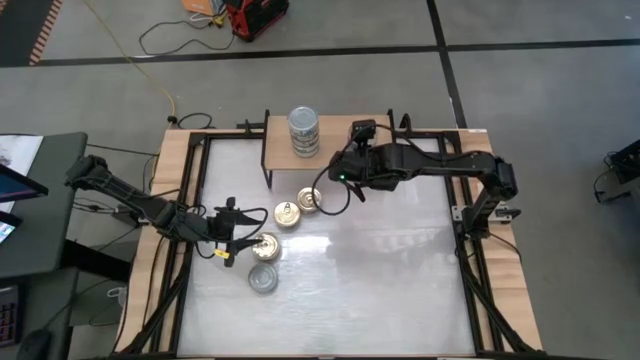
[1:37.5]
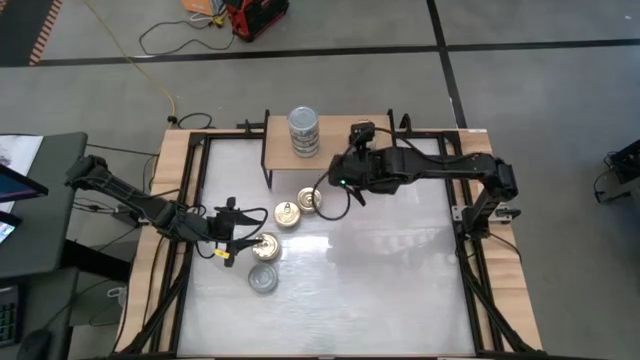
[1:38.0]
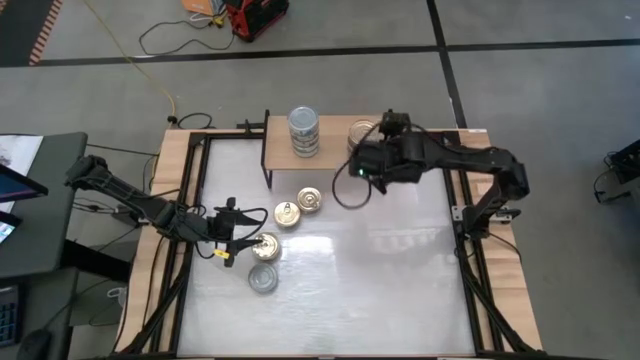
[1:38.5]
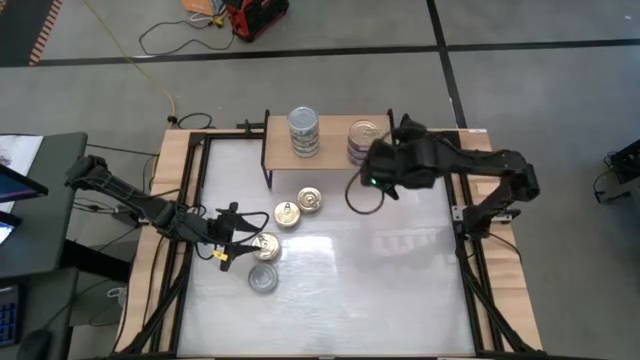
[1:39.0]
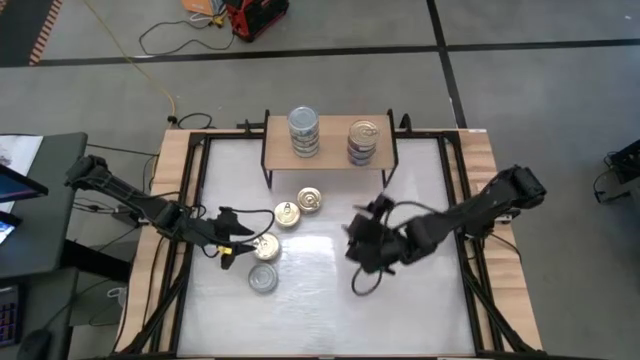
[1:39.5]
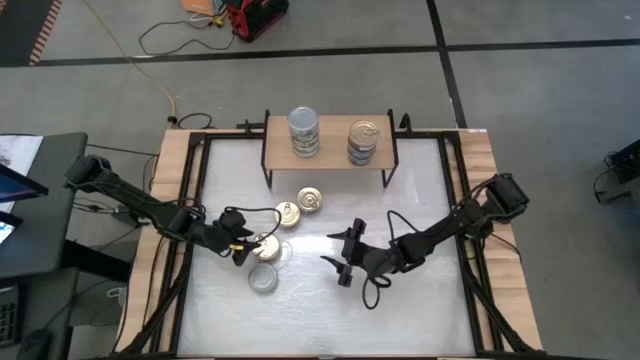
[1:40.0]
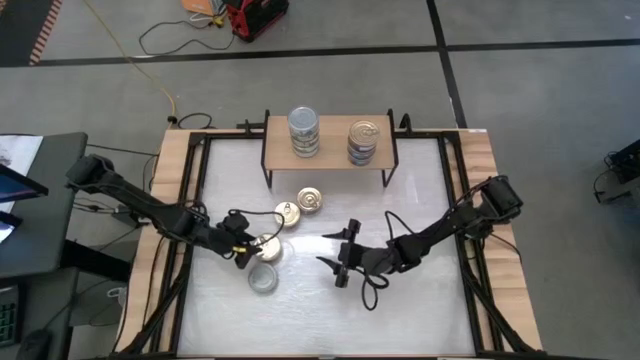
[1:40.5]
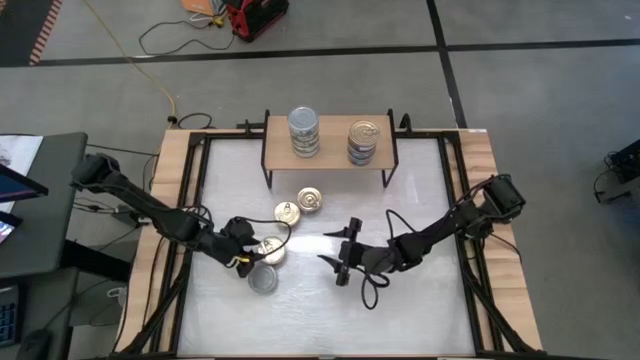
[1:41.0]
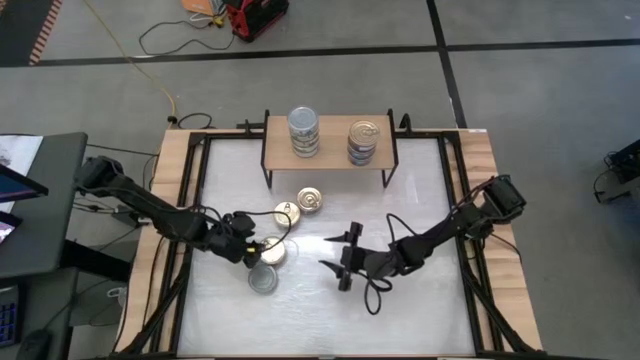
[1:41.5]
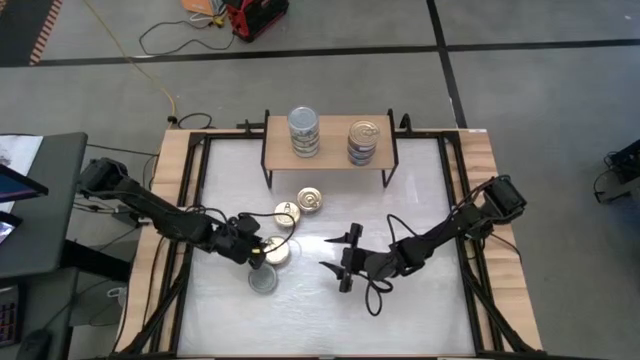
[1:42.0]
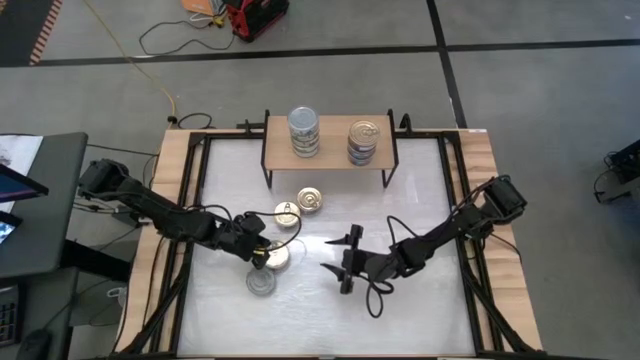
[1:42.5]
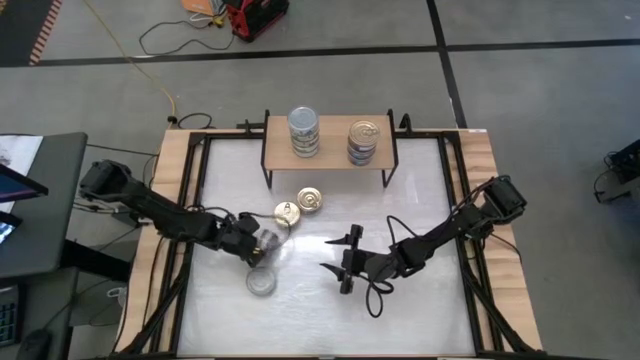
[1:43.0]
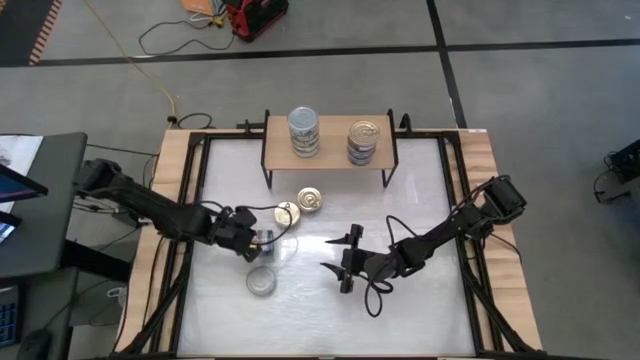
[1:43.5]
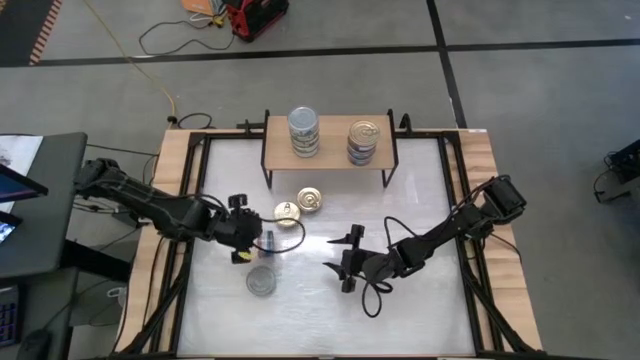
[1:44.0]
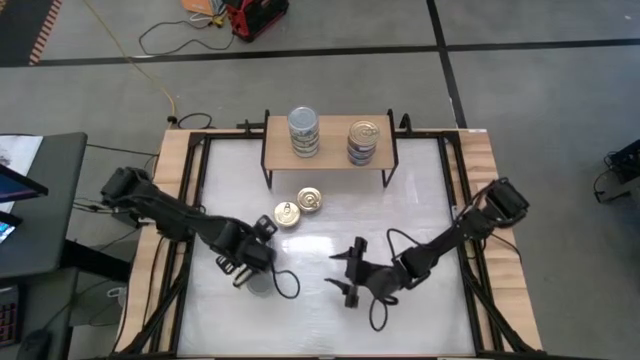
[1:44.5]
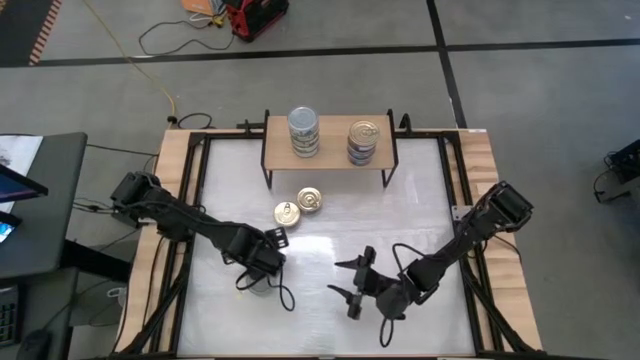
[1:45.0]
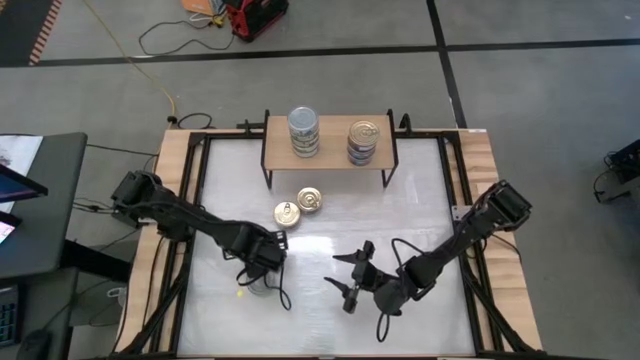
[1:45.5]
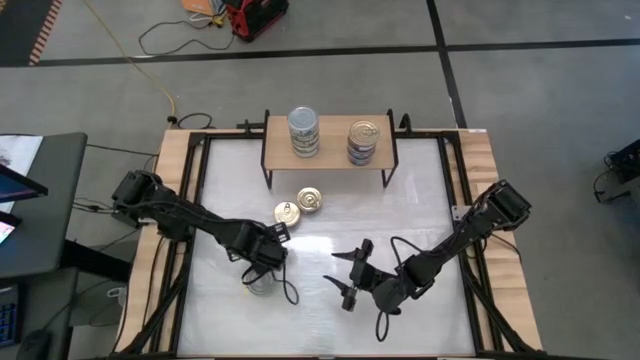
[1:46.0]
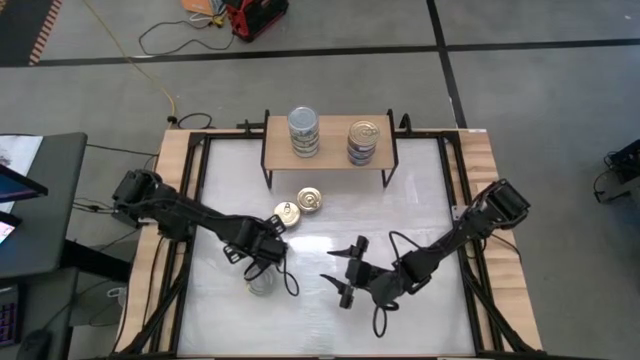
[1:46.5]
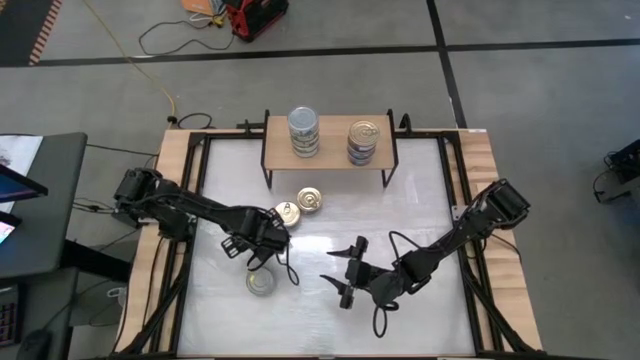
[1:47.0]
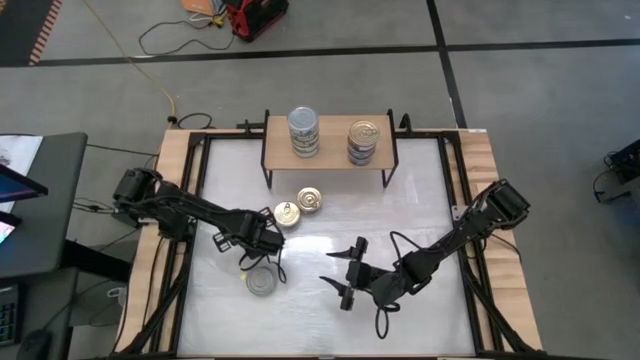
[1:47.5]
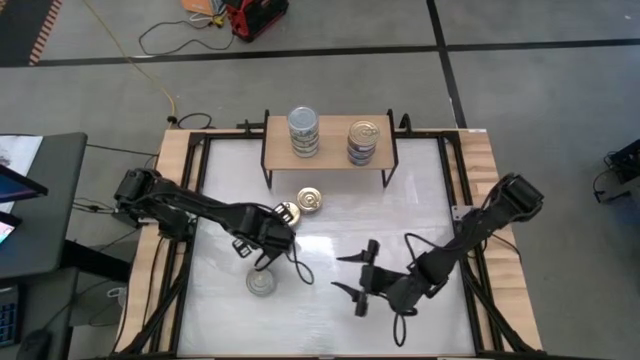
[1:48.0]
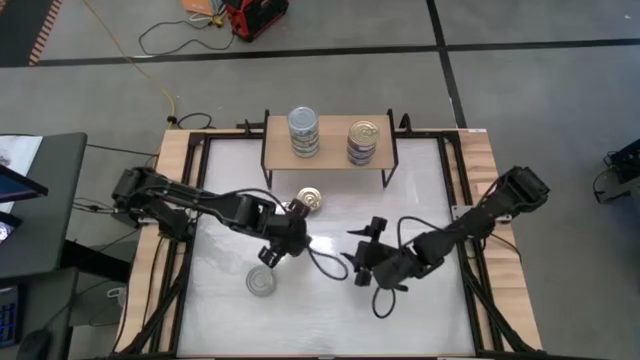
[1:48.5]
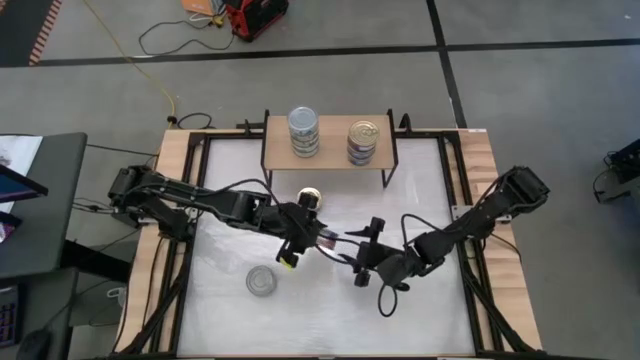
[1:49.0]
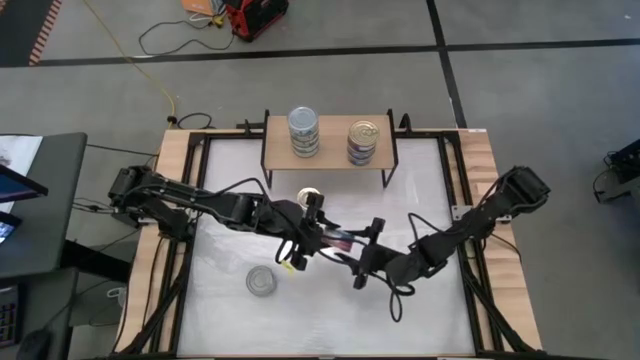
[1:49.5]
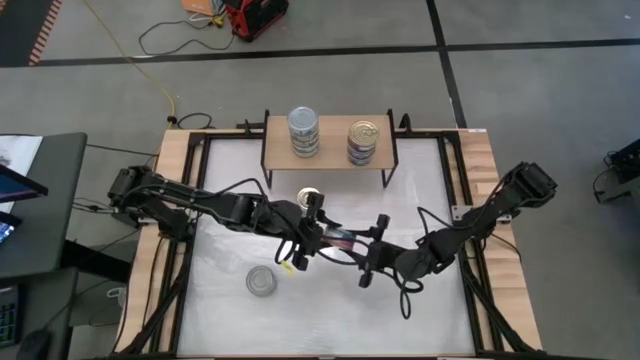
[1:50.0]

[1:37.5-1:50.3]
Task: Stack canned seafood by type on shelf
Stack the blue pink tuna can on top of the other blue and pink tuna cans on the shelf

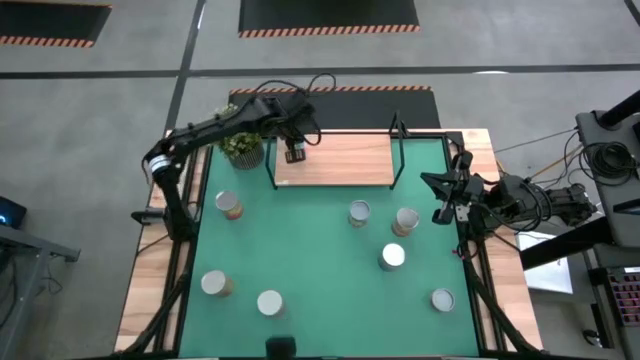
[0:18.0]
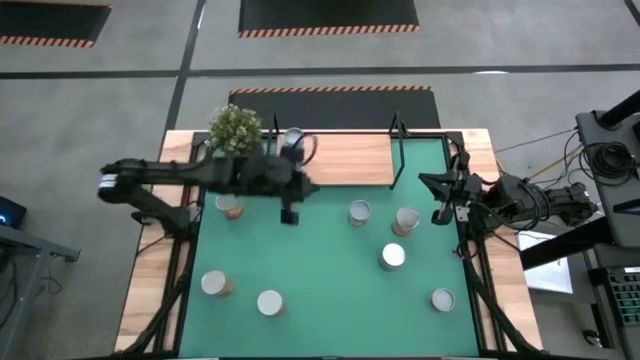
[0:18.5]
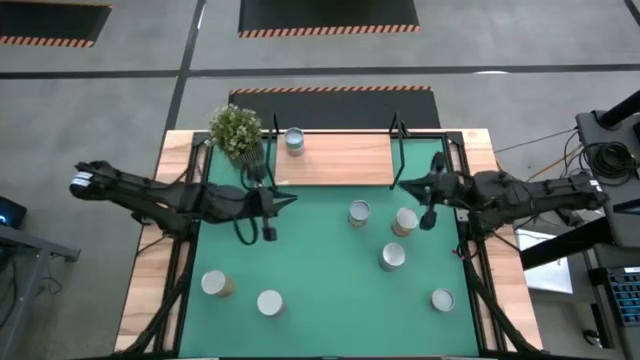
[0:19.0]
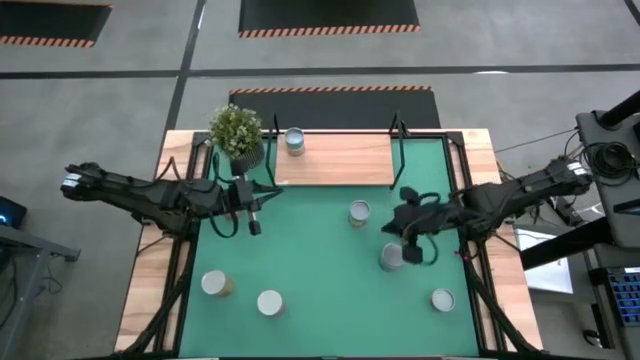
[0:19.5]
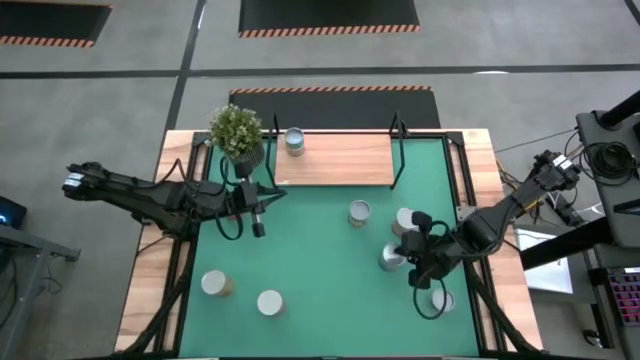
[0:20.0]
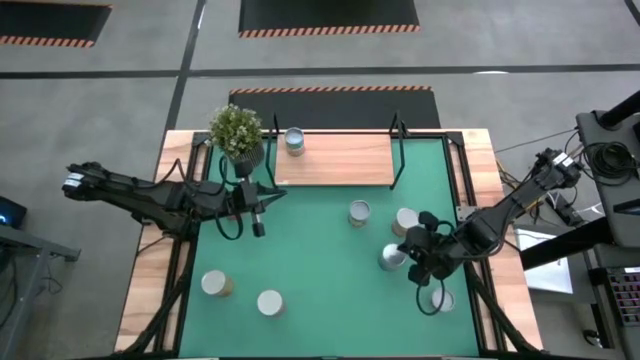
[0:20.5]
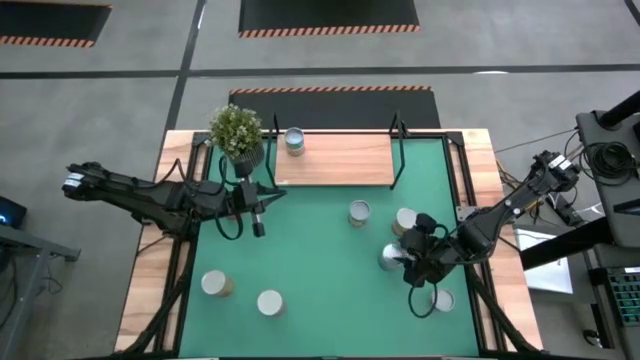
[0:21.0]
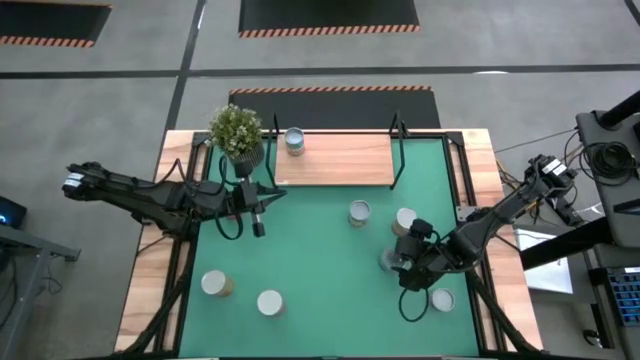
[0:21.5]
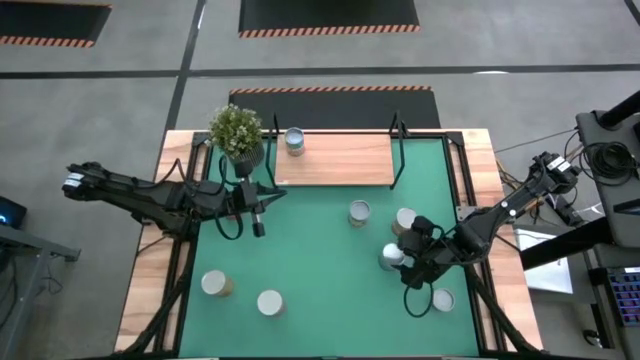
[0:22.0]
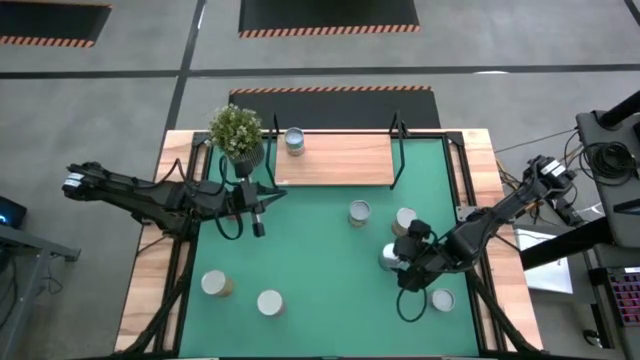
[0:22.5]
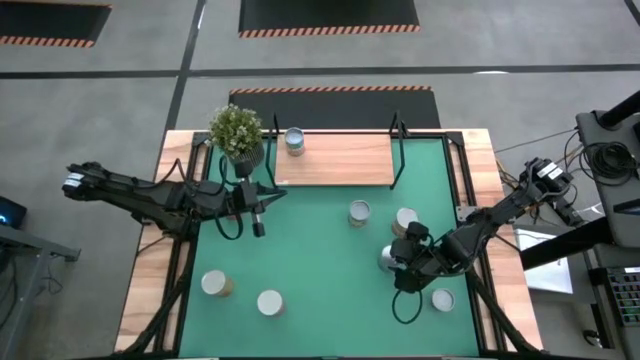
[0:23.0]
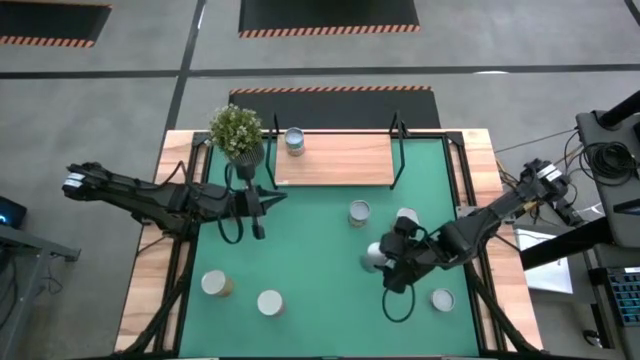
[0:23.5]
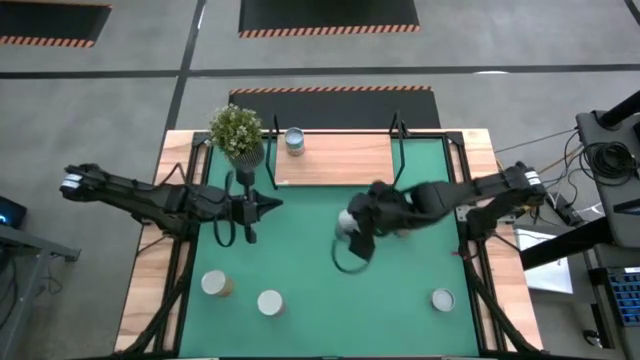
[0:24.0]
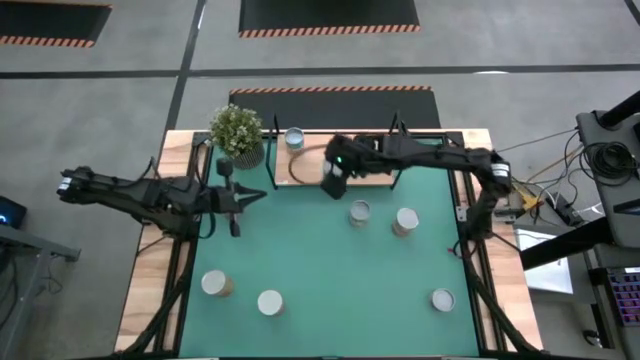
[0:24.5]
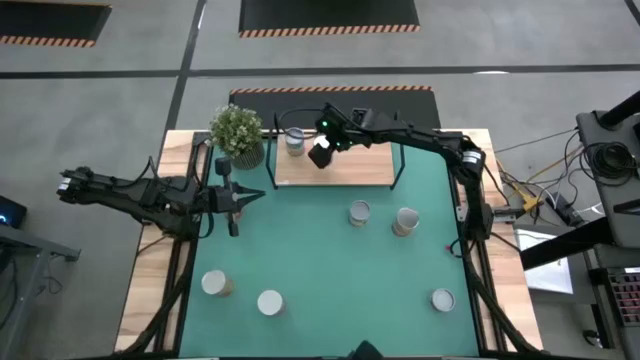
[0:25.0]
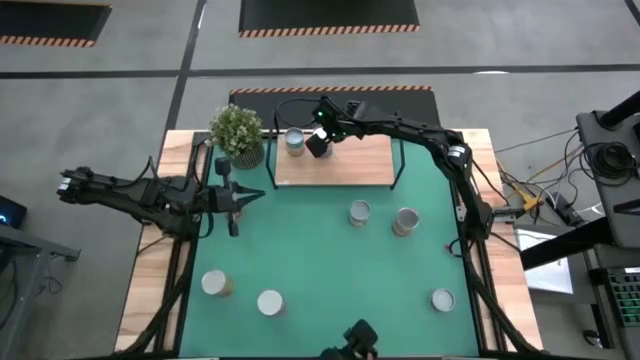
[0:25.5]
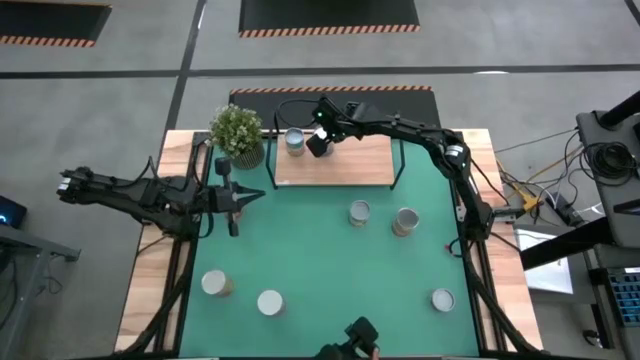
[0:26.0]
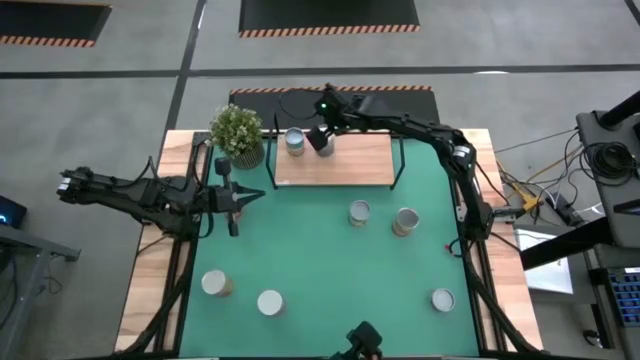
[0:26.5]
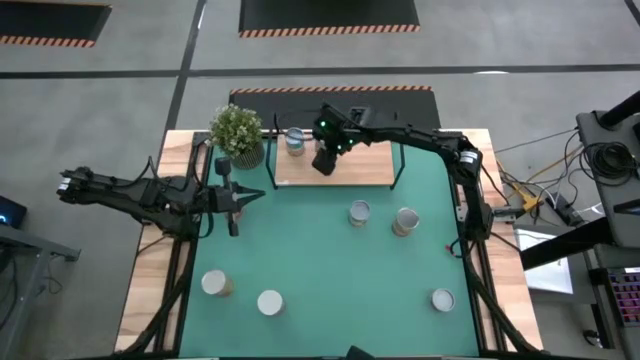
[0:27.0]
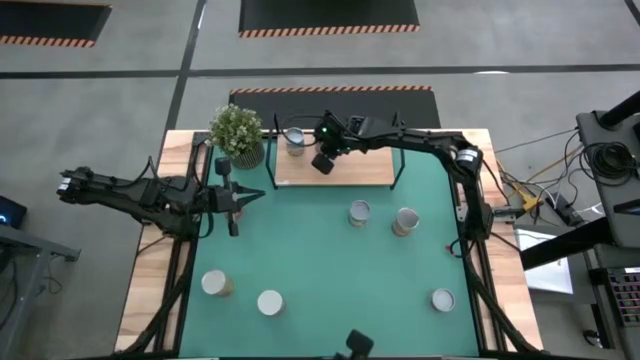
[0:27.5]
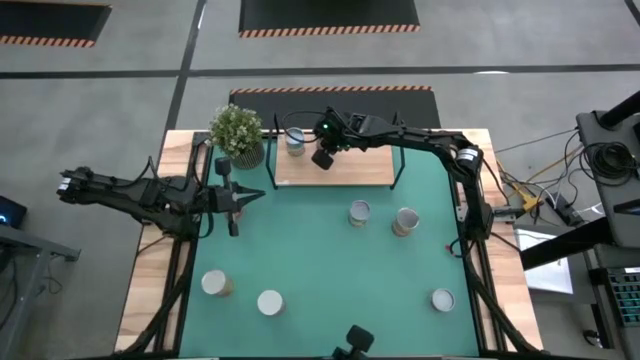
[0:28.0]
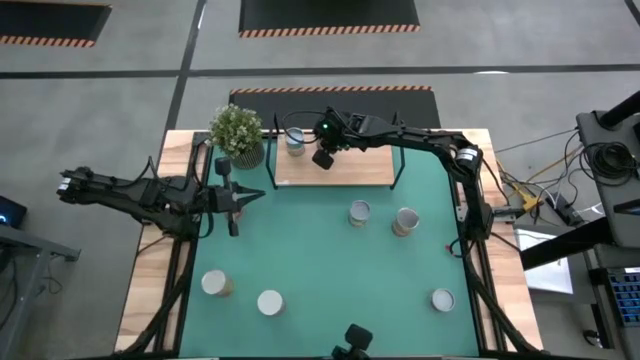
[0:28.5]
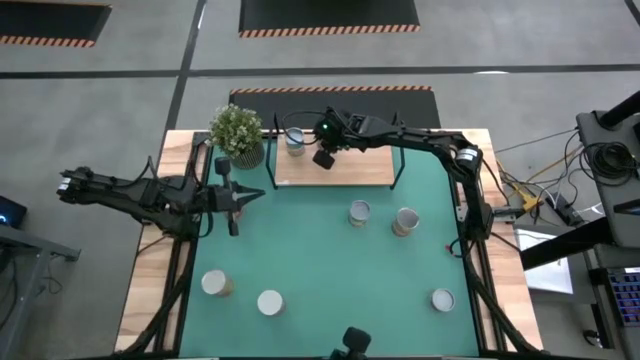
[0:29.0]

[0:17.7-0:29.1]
Task: Pick and place cans onto a shelf
Put the canned peas on the shelf
